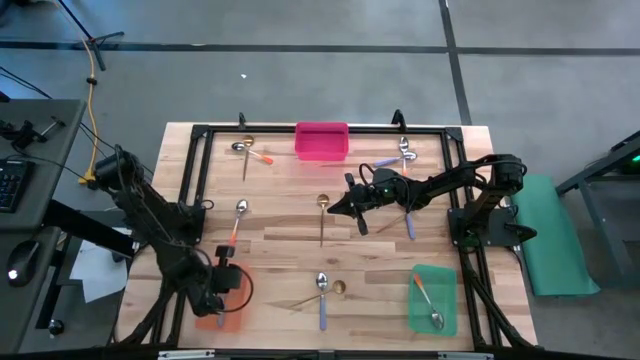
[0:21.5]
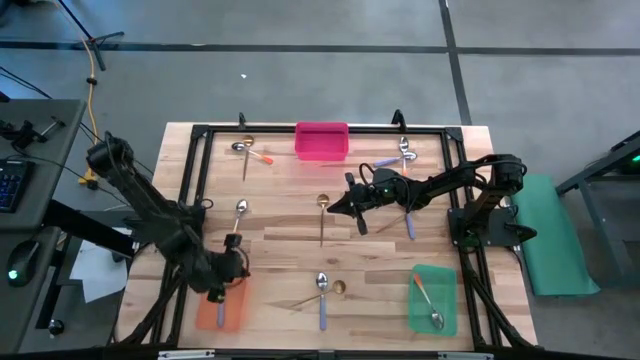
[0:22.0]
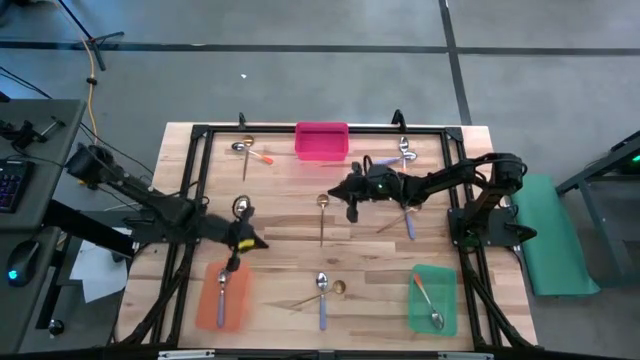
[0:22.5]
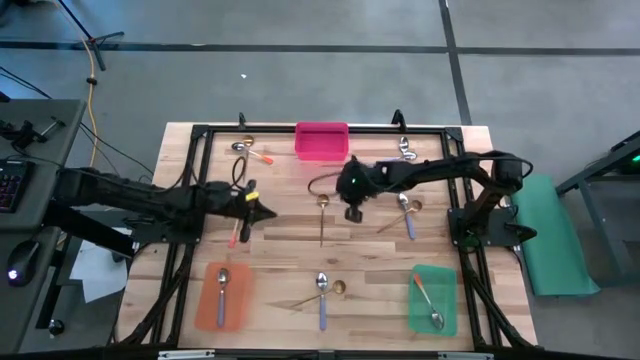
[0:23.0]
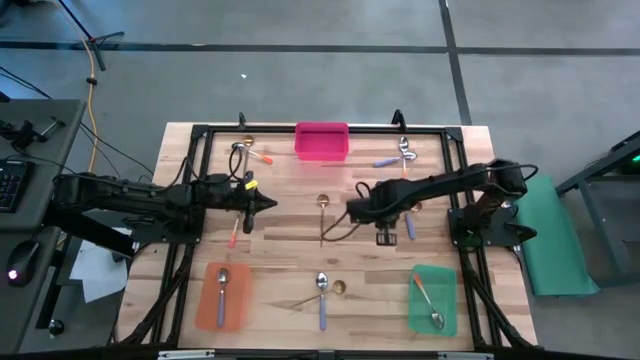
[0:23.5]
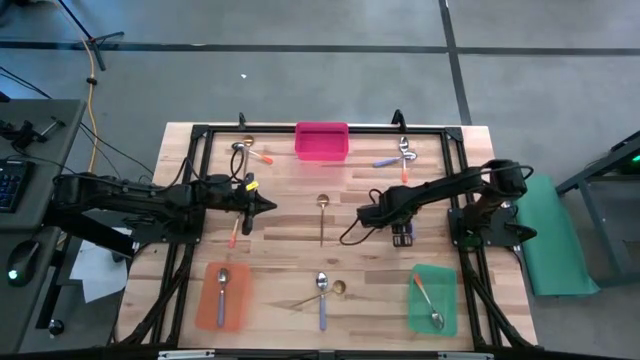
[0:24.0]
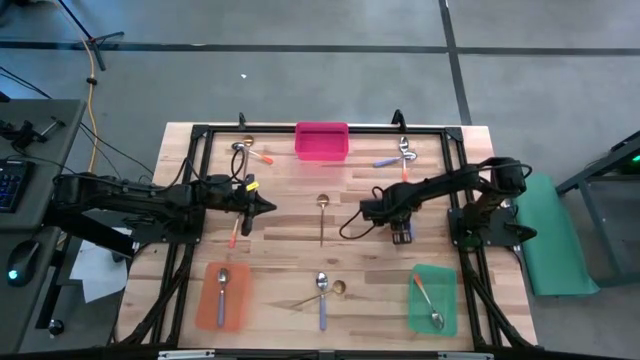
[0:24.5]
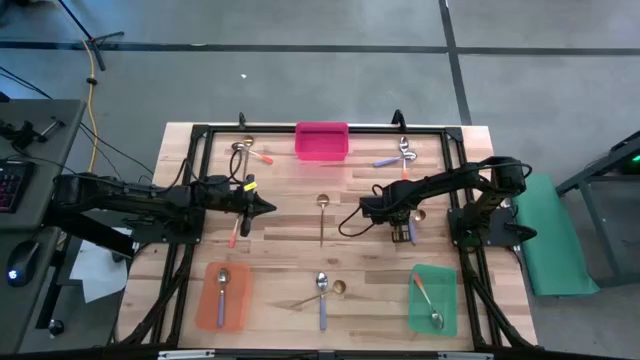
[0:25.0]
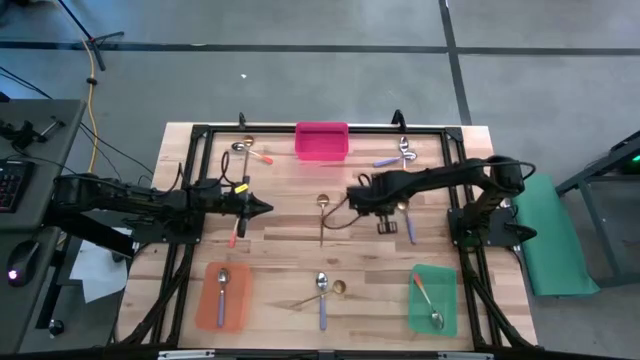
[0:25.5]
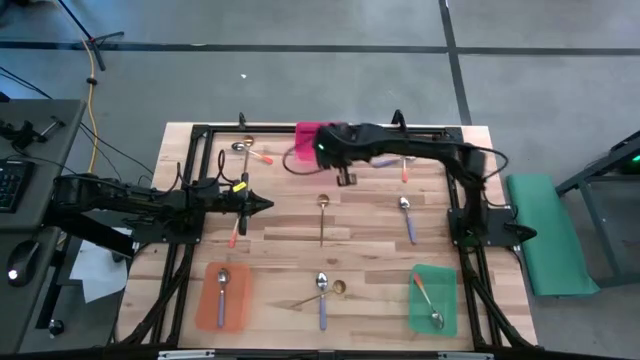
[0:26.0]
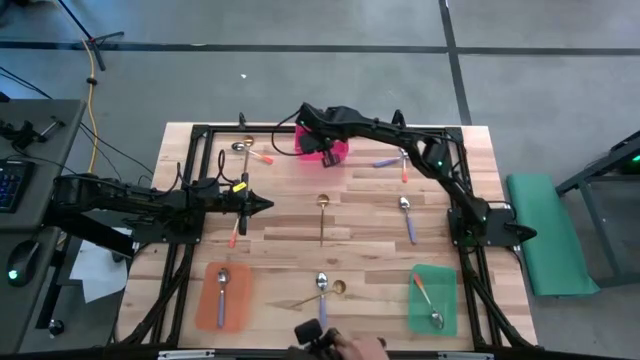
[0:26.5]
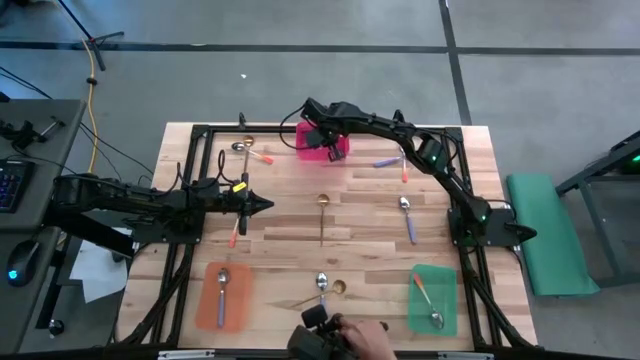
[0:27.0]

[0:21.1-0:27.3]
Task: Sort silverware by color (type)
Put the gold spoon into the red bin

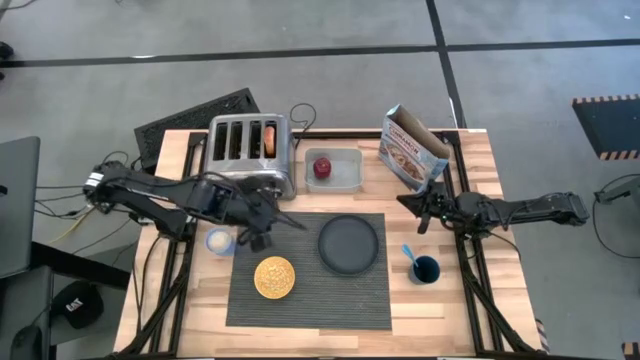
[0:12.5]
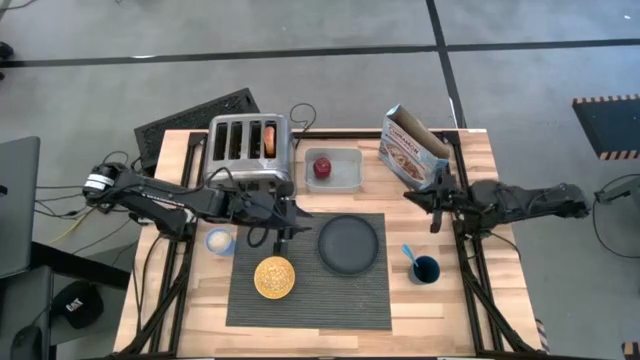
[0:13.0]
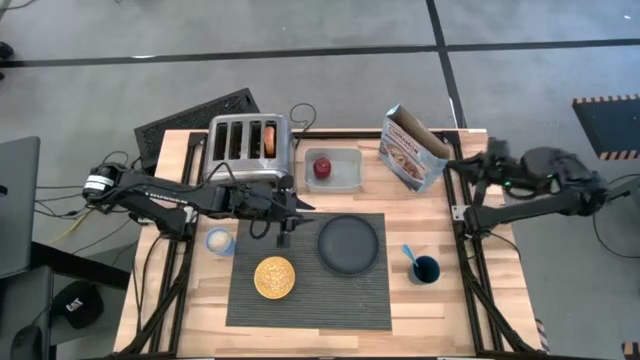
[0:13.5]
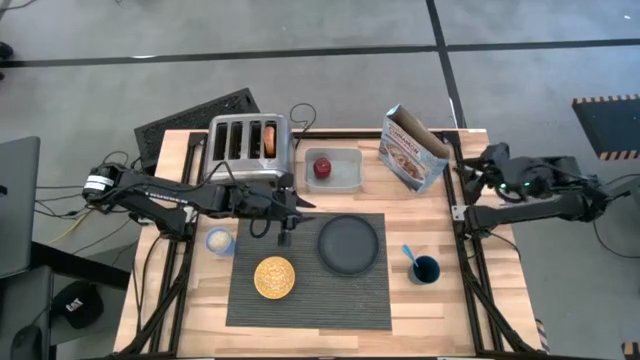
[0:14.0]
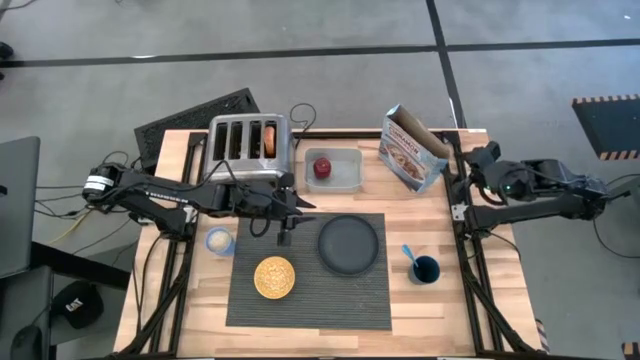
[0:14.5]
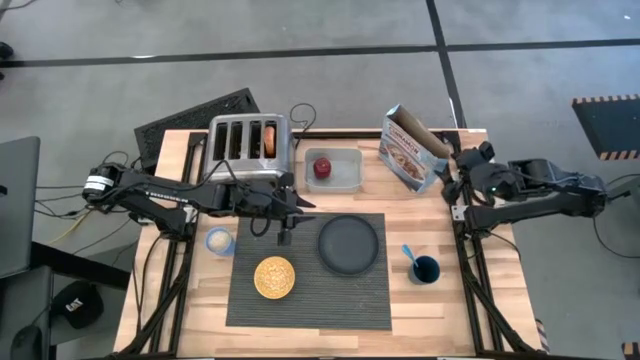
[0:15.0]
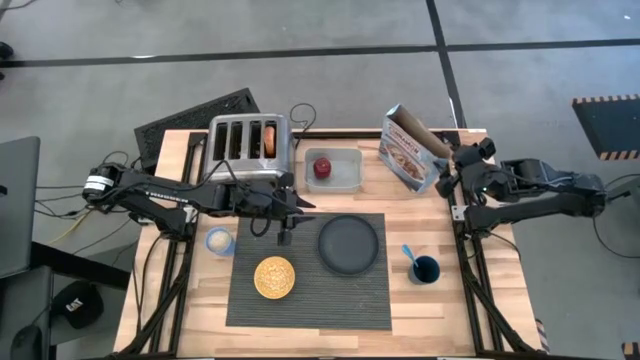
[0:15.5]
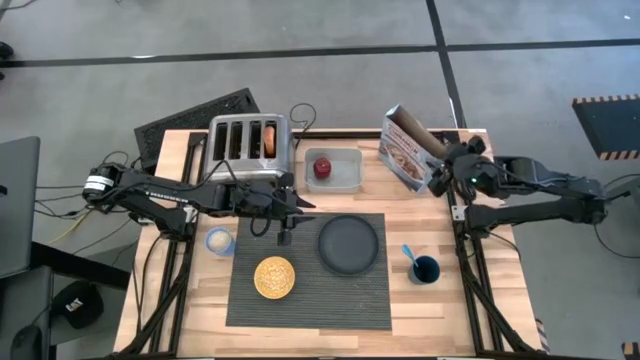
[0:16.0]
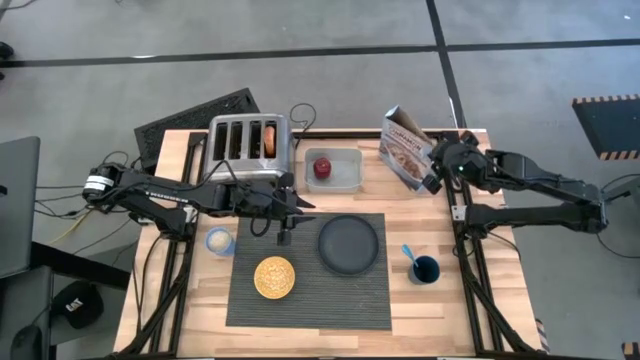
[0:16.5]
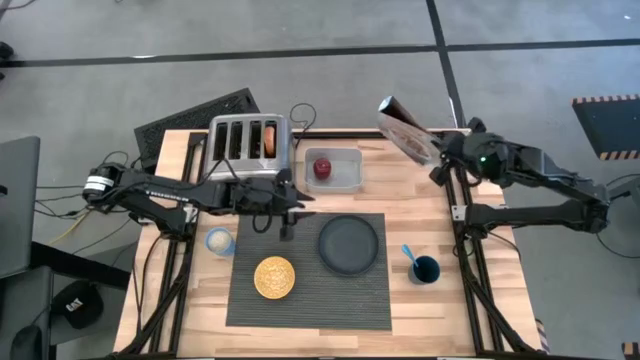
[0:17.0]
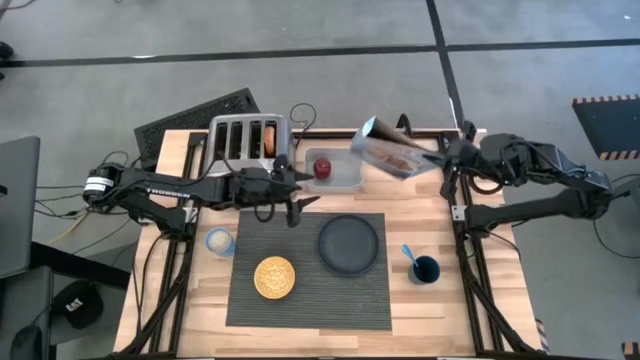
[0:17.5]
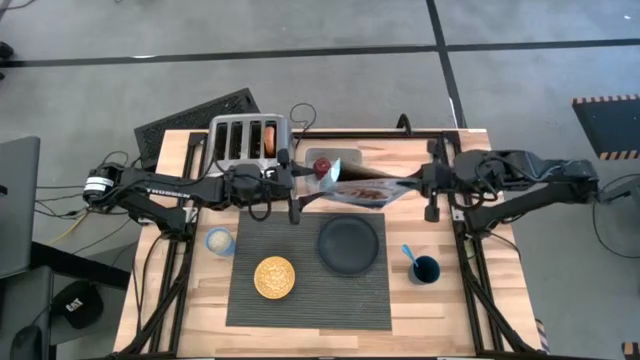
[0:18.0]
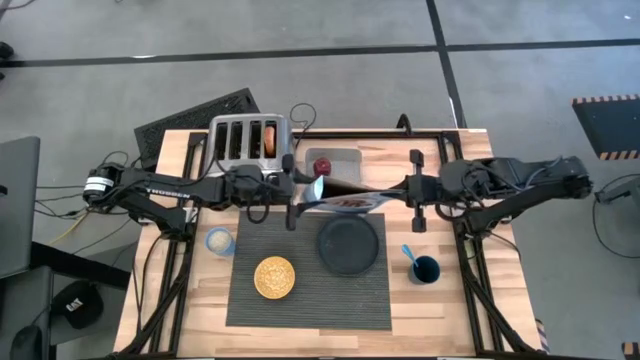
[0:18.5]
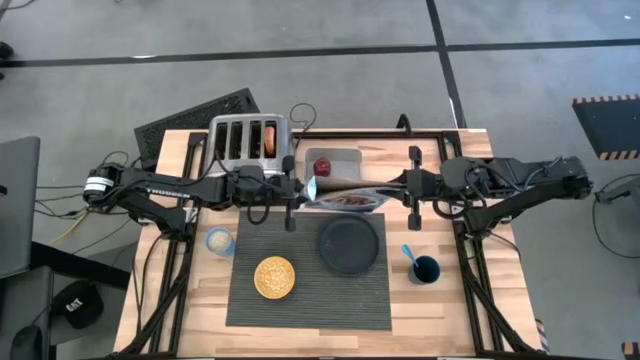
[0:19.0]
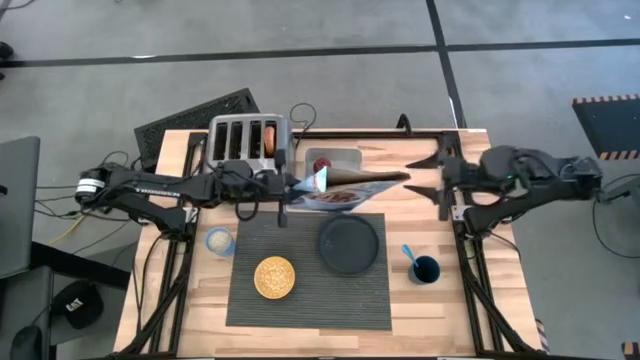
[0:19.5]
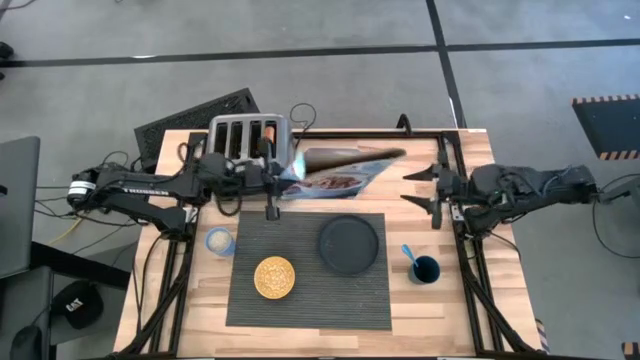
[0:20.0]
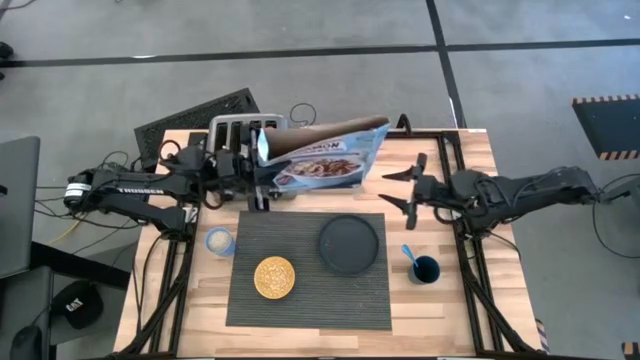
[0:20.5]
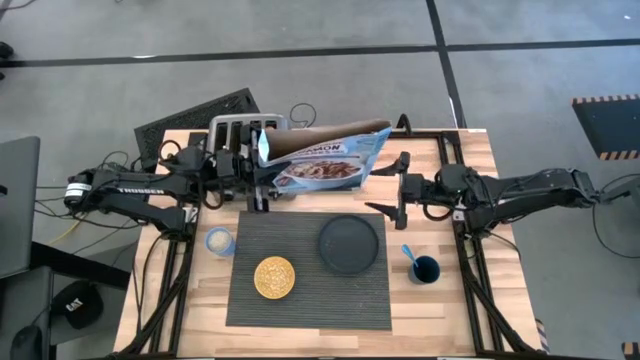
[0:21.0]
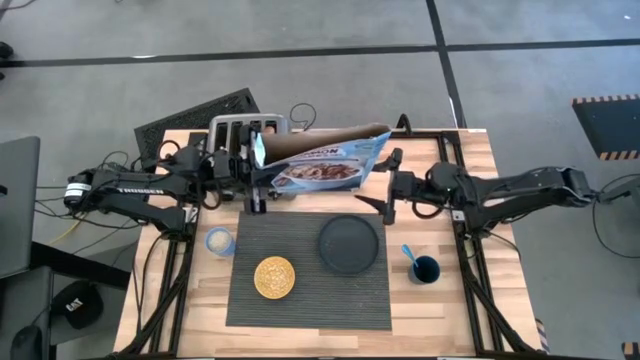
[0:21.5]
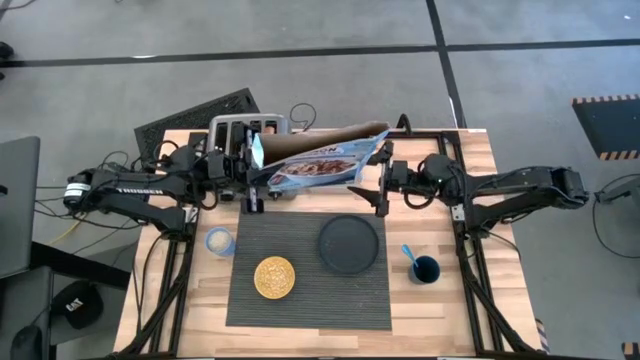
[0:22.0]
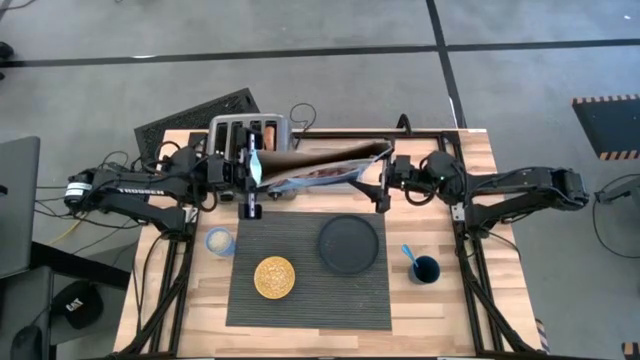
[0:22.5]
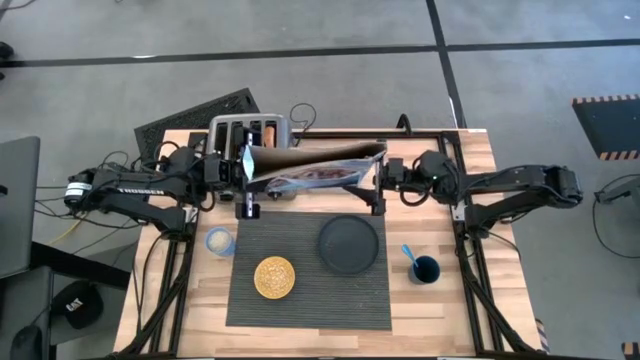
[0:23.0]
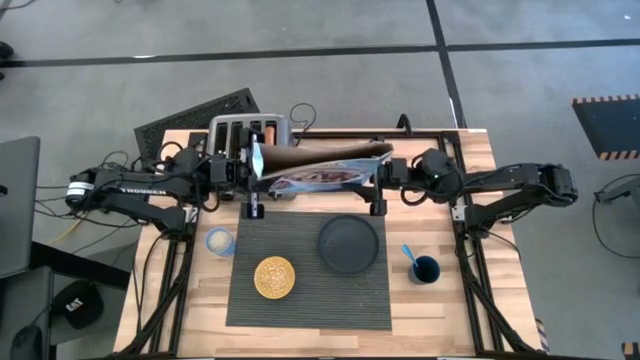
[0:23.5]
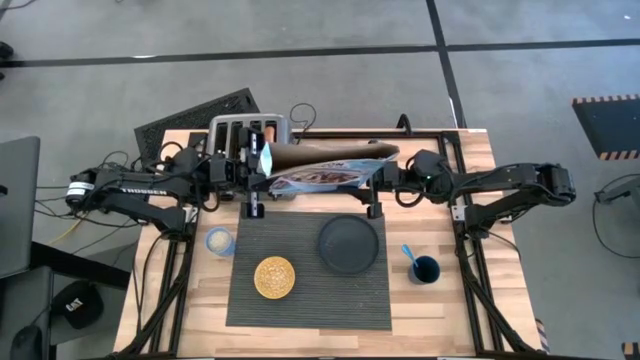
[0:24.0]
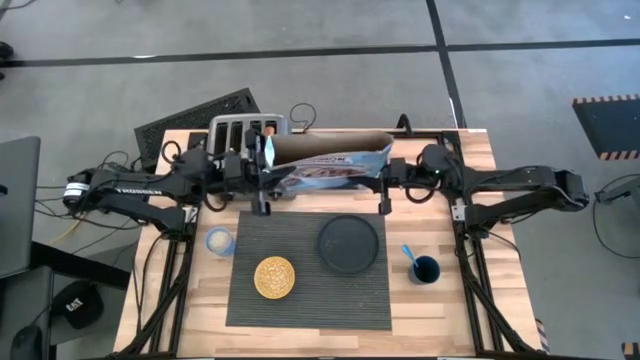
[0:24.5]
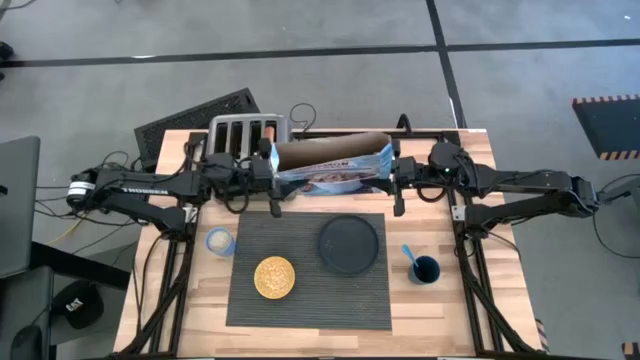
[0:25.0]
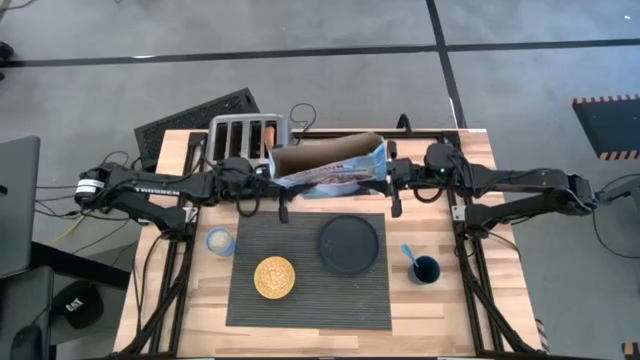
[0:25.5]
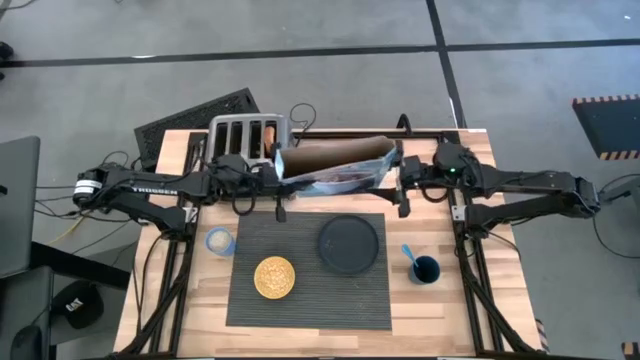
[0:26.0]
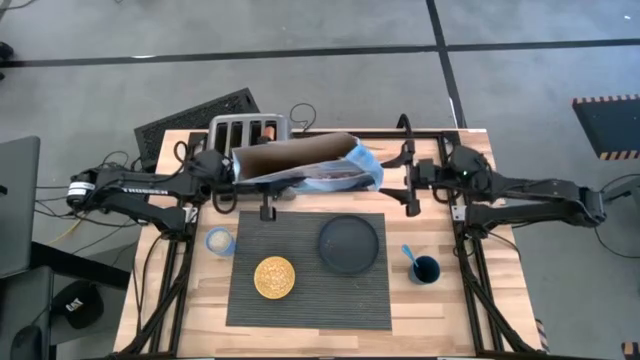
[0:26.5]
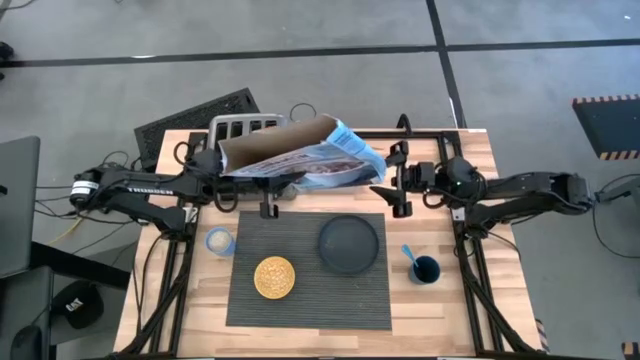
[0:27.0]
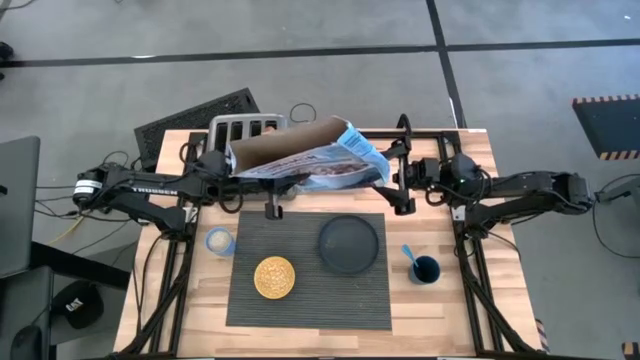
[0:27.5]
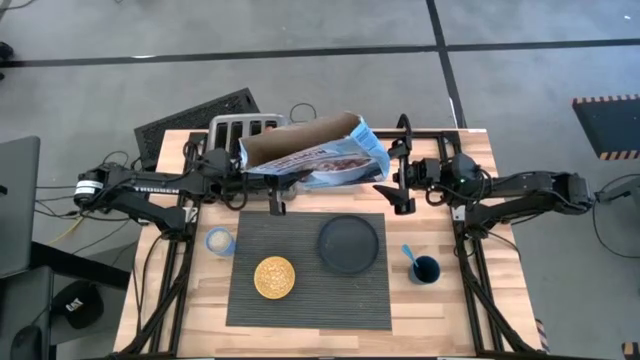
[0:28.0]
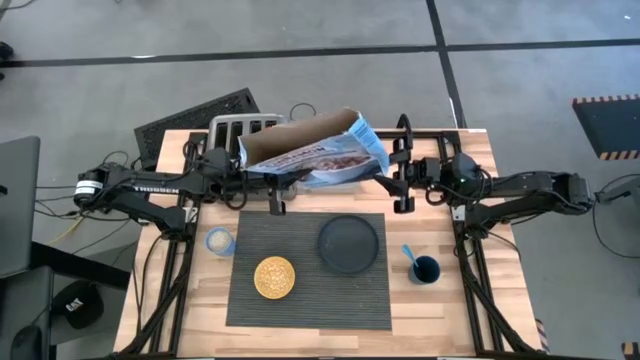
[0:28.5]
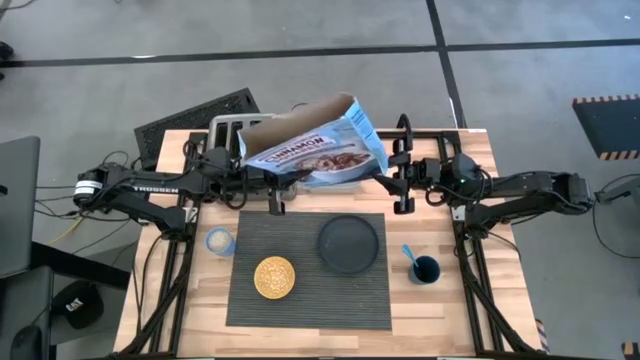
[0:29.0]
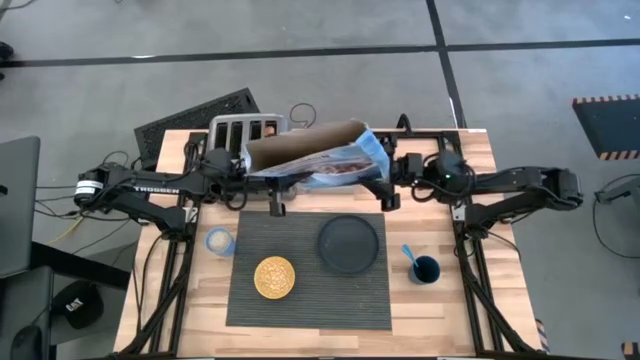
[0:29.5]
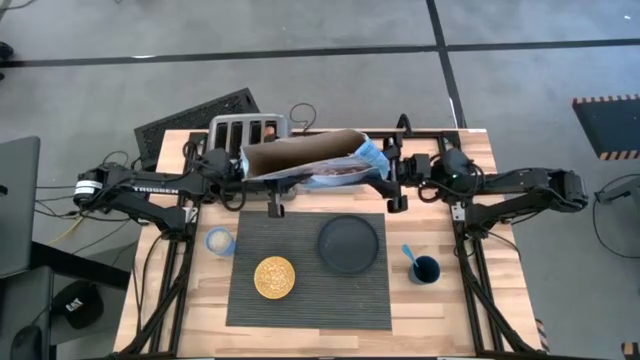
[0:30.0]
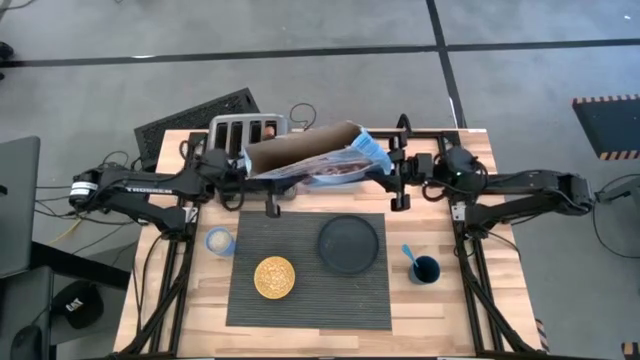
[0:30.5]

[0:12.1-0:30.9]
Task: Arrange a breakfast setting
Pour the cereal from the blue cereal box into the yellow patterned bowl
